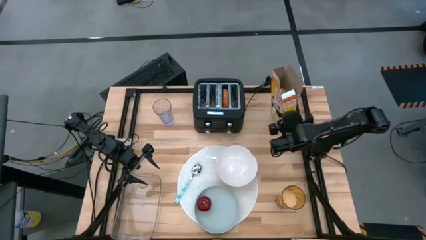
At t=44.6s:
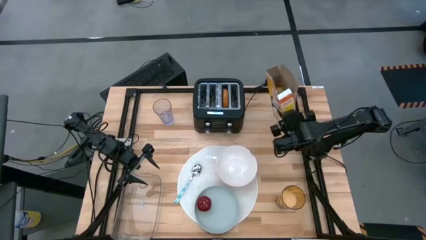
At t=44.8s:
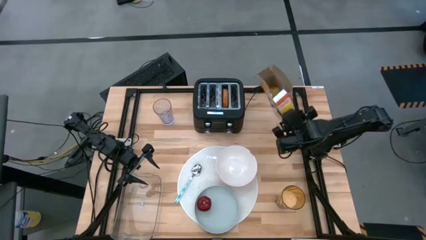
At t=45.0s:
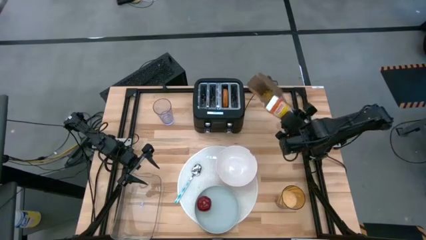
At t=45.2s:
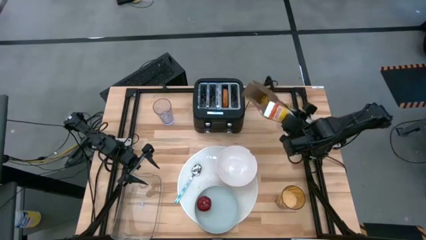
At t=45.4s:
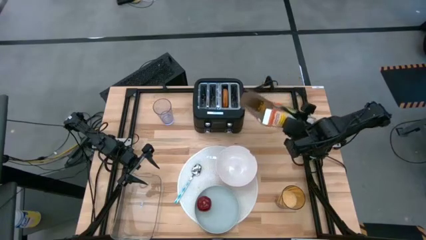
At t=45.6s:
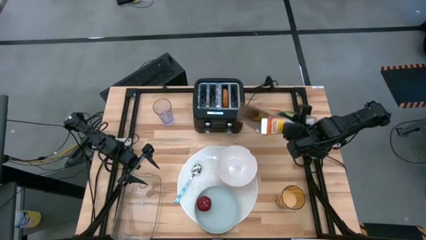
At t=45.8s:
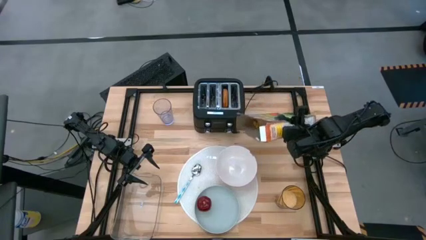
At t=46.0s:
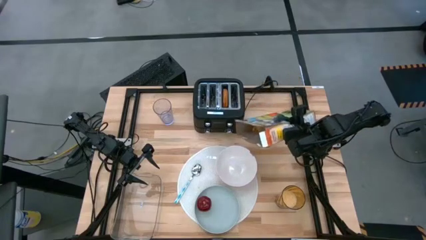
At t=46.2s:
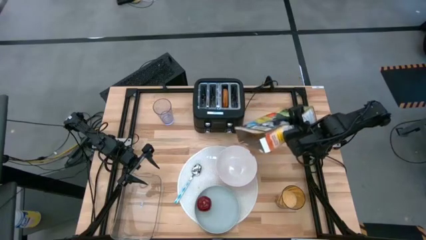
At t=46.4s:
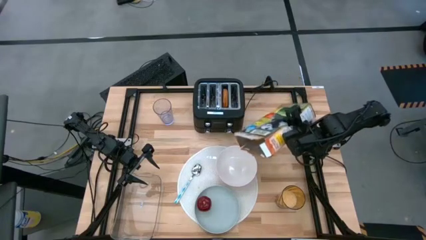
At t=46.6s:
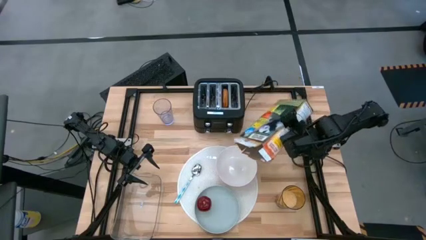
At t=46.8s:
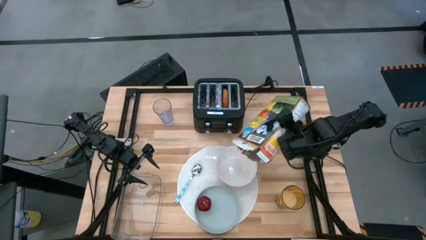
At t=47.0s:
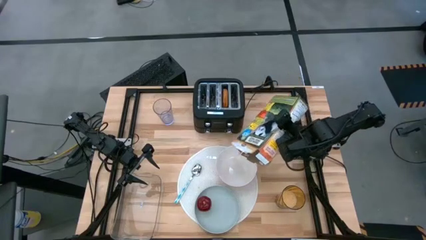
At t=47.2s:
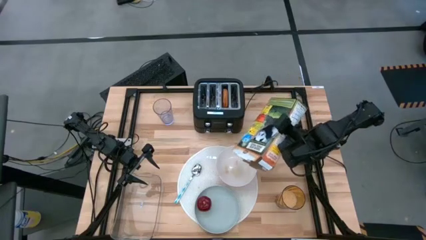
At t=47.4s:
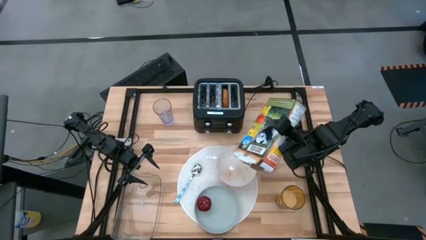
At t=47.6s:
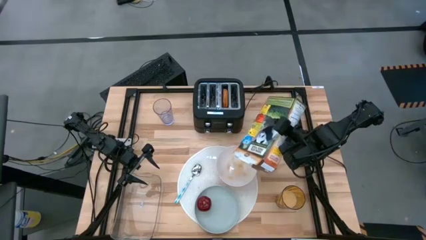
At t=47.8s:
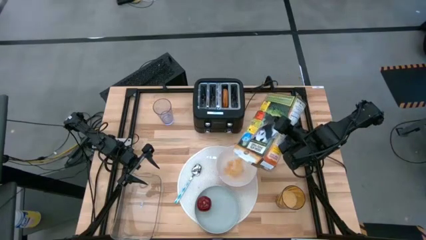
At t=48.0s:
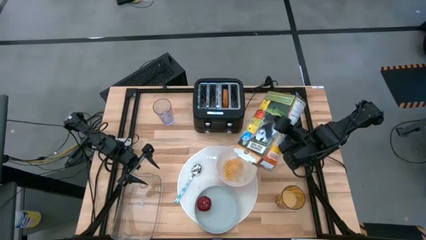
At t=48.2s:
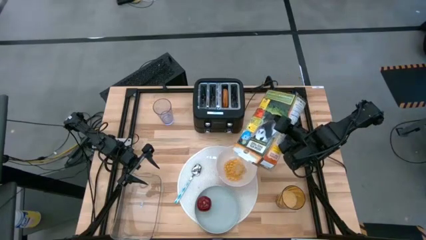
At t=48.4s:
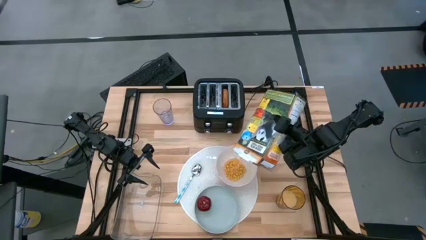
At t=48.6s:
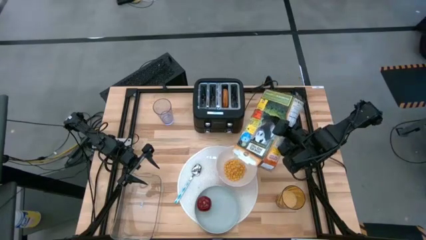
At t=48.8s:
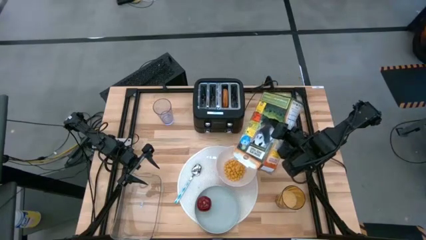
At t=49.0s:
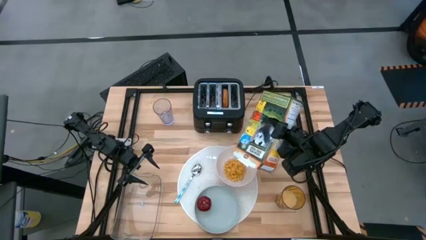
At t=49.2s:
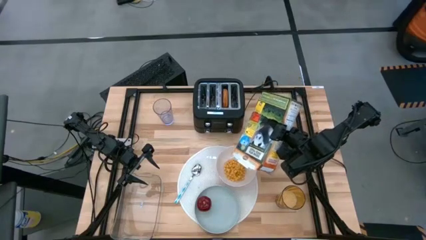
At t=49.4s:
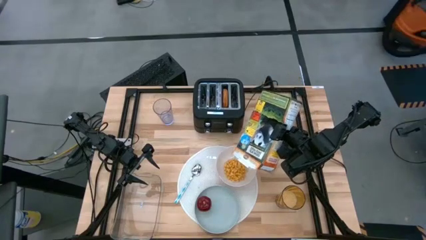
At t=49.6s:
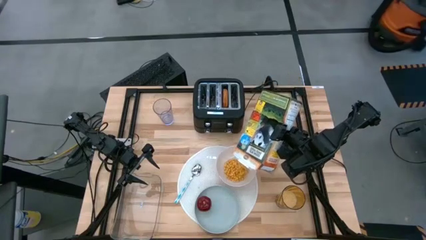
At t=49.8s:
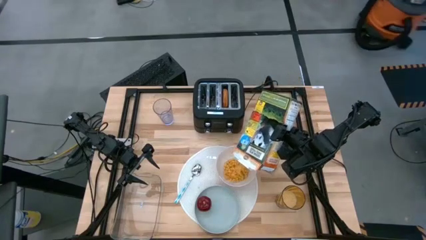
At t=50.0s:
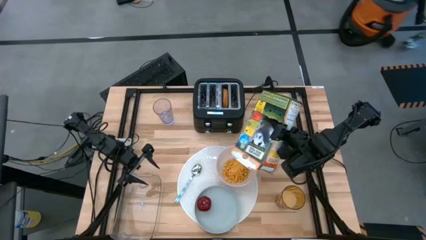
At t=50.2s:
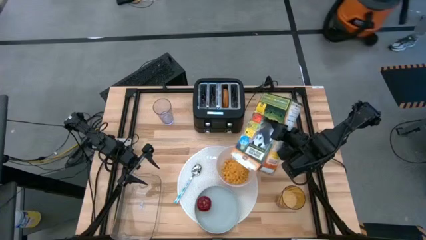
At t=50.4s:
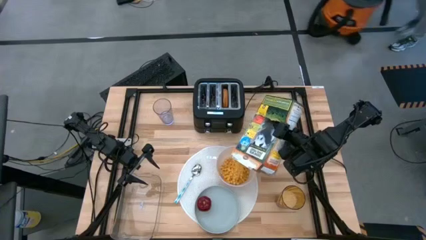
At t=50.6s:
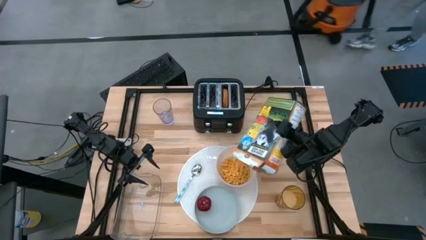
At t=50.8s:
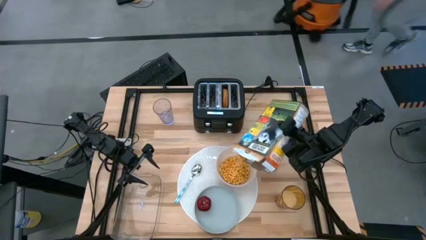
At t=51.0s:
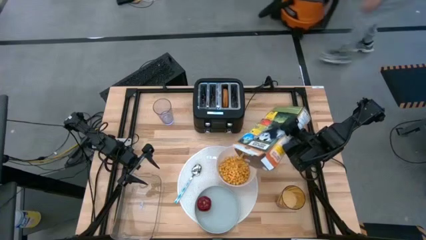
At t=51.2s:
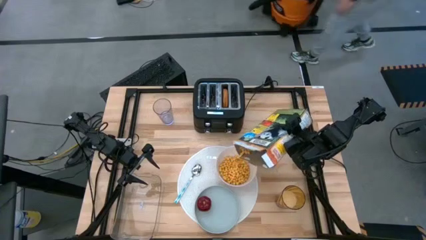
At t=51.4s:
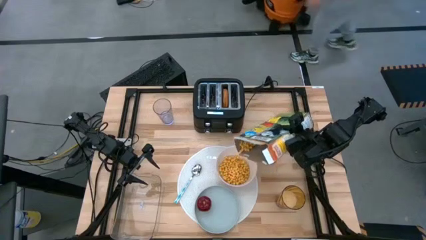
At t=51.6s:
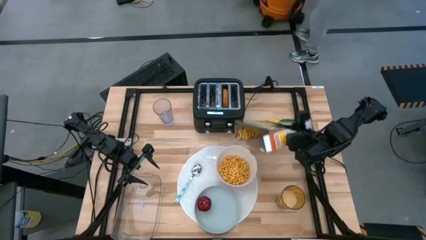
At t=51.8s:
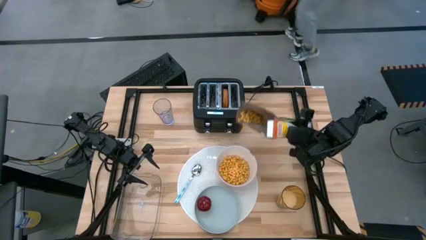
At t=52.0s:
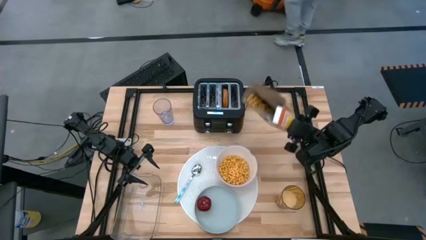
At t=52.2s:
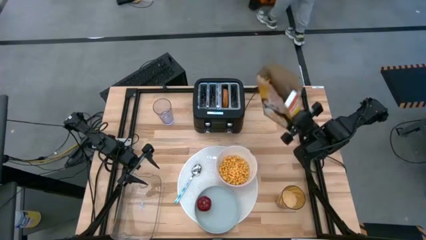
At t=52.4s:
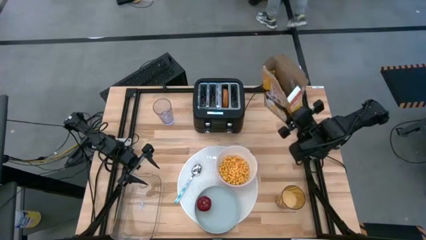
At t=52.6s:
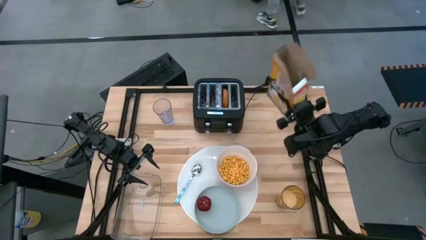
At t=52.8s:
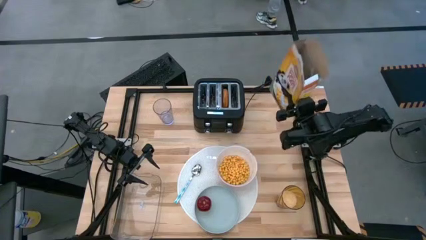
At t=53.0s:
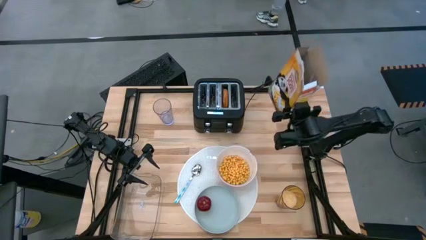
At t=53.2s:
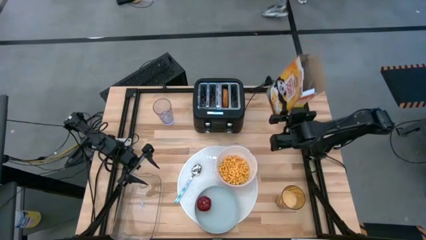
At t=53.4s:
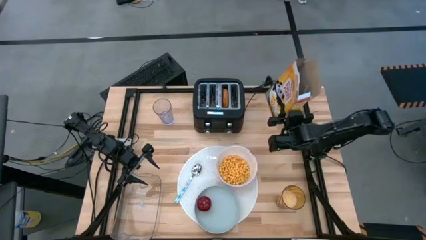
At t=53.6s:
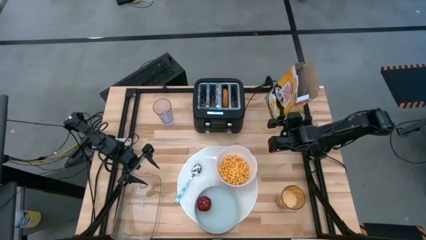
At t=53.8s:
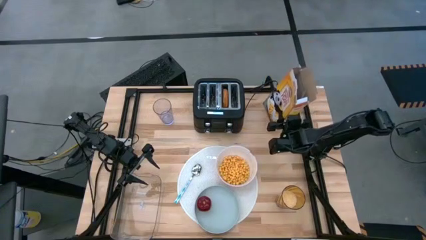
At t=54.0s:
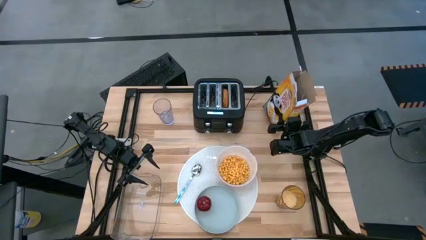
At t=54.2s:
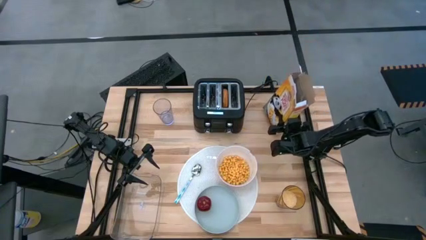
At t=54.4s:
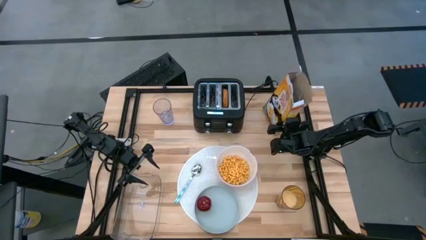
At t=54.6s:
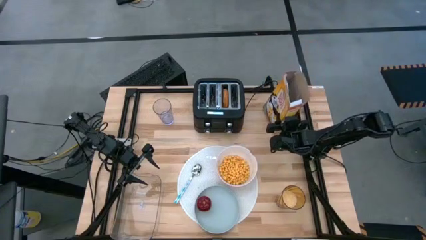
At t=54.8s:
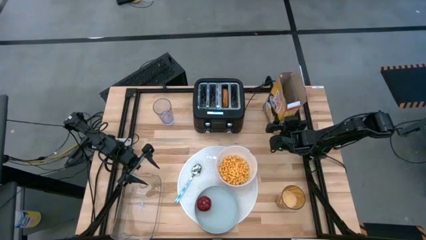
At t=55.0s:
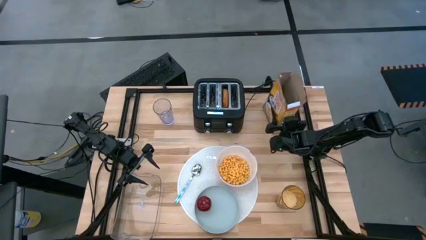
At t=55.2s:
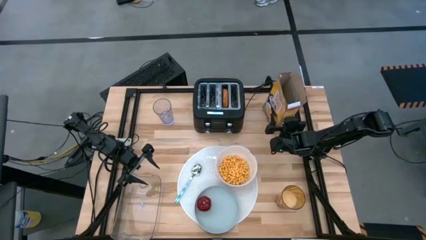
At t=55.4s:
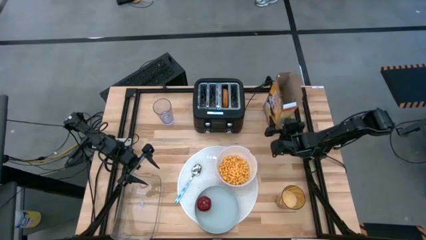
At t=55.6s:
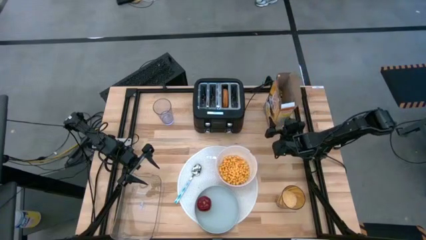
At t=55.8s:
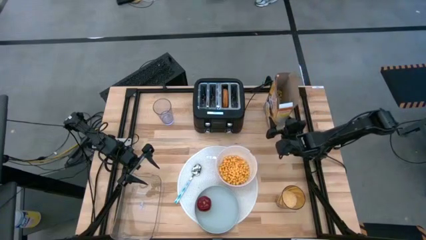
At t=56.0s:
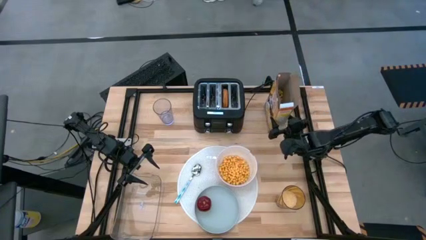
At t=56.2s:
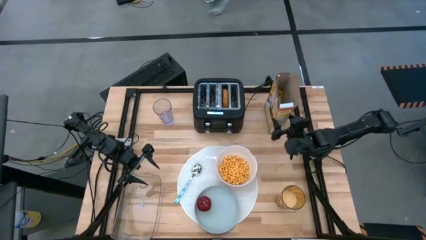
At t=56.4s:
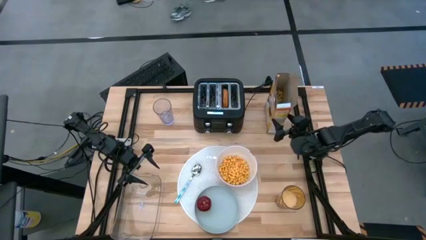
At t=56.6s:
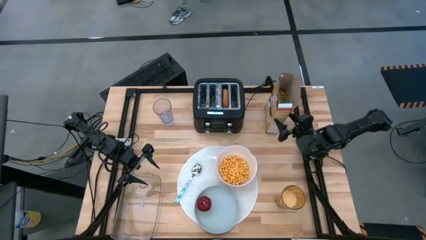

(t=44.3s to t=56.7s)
Task: Arrange a breakfast setting
Pour the cereal from the cereal box into the white bowl

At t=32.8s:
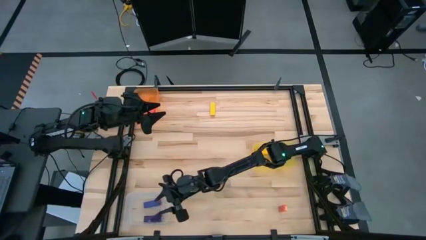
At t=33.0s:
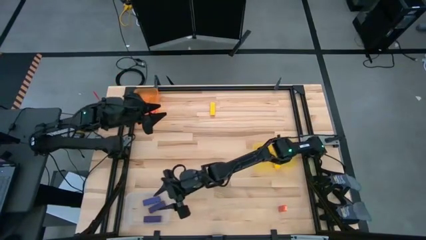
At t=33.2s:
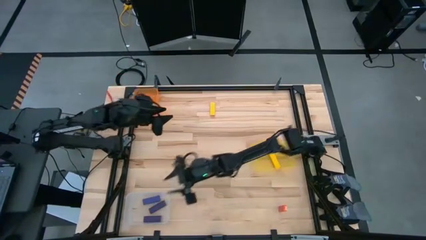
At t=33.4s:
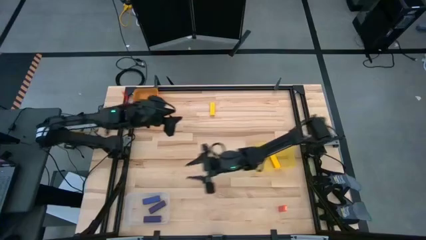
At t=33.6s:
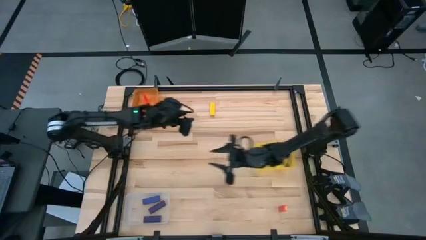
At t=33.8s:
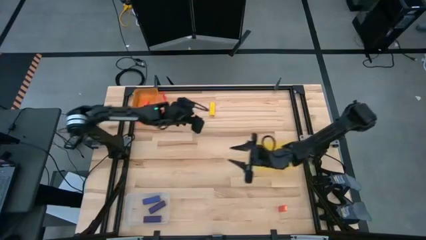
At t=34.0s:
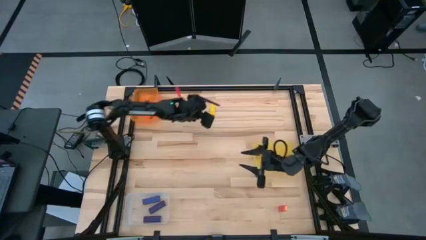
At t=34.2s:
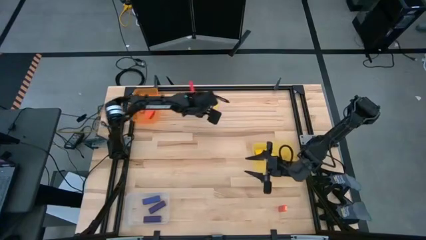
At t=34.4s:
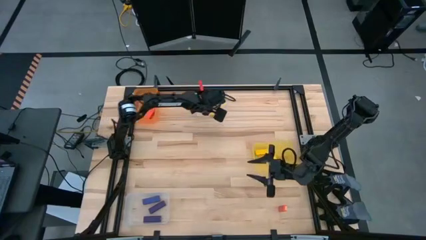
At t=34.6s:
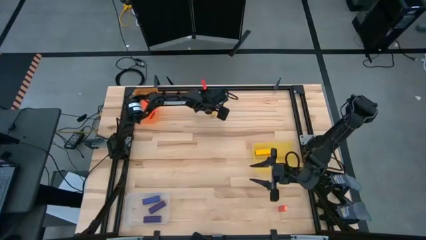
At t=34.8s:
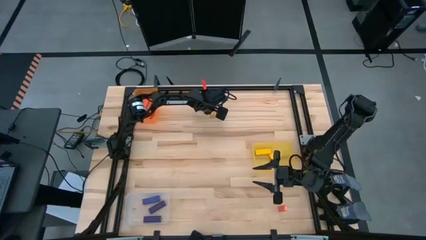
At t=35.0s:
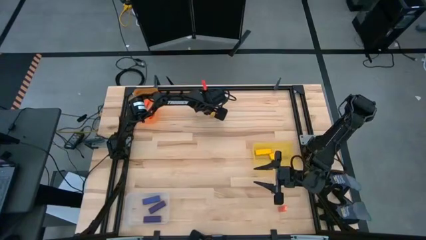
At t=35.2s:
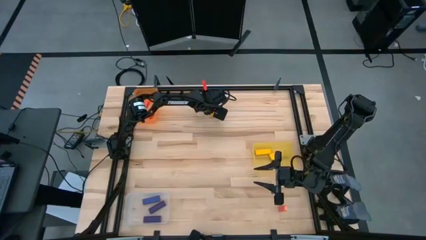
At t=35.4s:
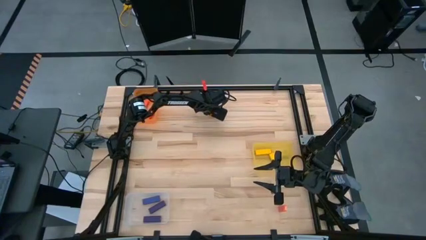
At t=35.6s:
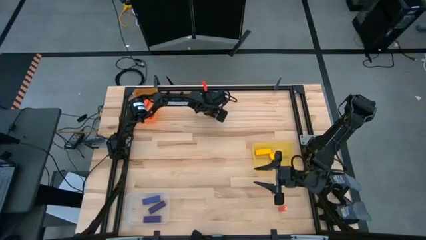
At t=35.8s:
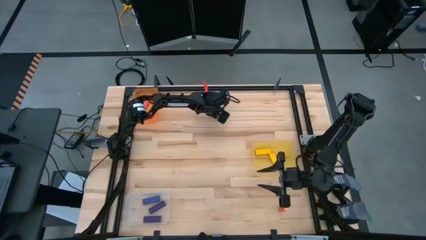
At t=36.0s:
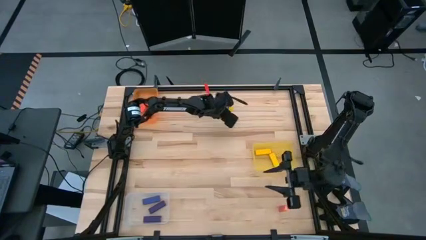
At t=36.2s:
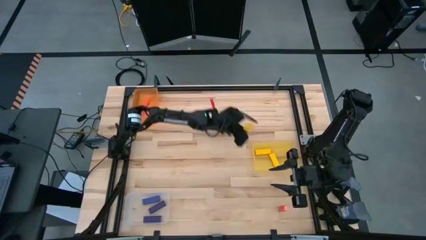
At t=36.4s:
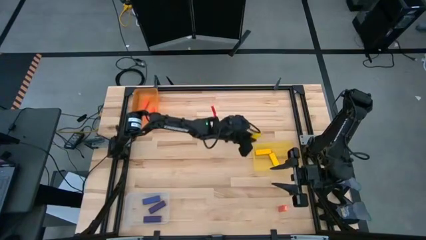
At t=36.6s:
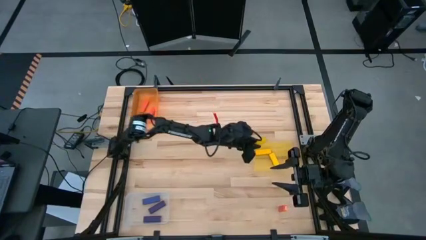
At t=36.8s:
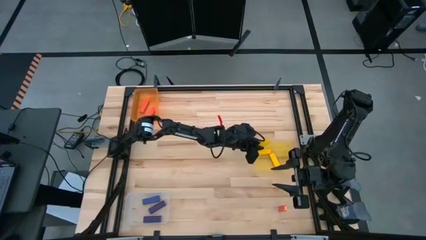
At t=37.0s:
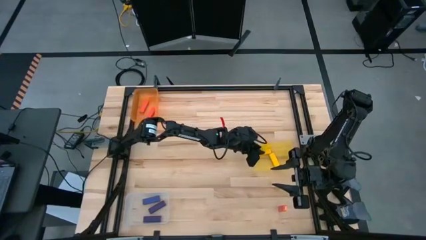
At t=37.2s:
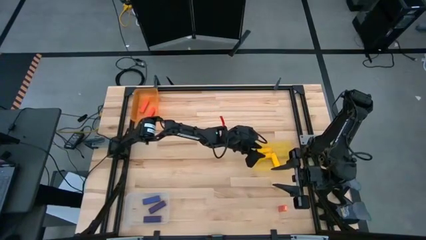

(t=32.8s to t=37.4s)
Task: Sort blocks
Put the yellow block into the yellow transparent bin
